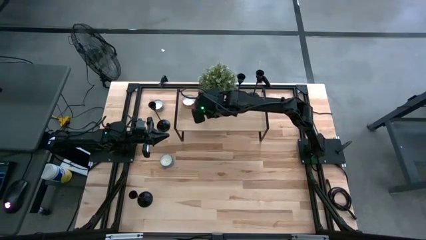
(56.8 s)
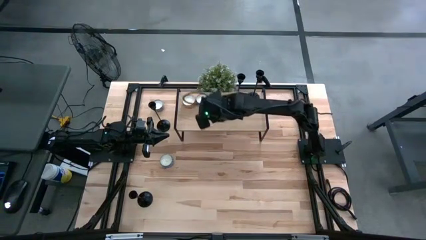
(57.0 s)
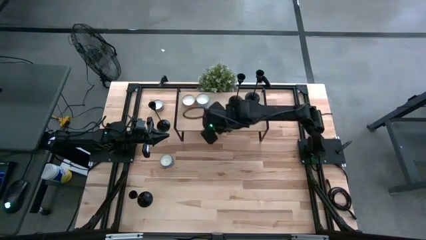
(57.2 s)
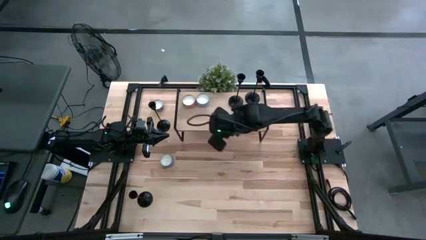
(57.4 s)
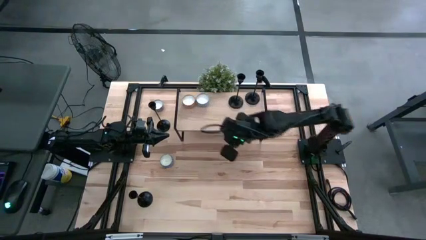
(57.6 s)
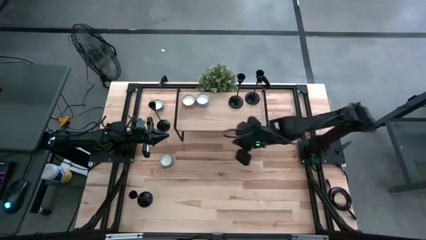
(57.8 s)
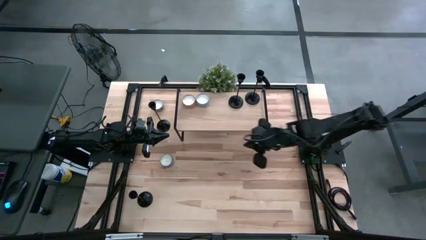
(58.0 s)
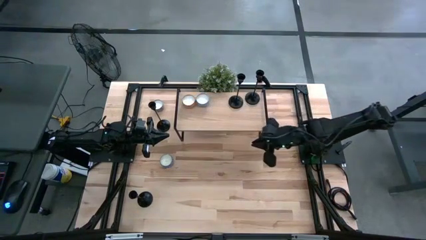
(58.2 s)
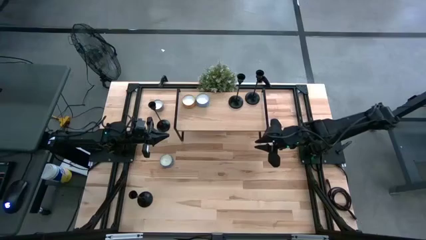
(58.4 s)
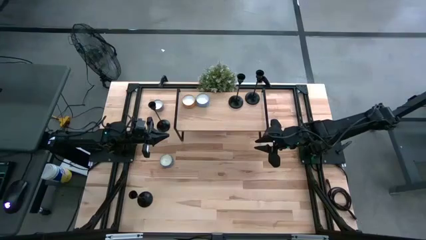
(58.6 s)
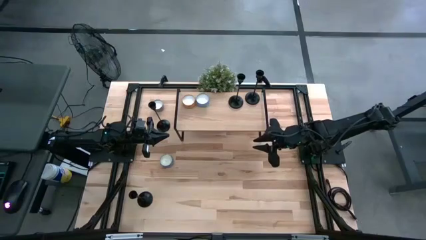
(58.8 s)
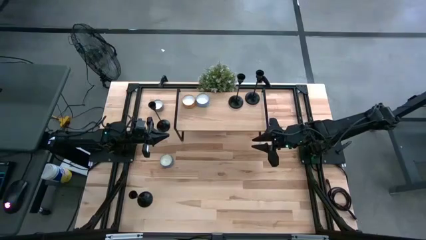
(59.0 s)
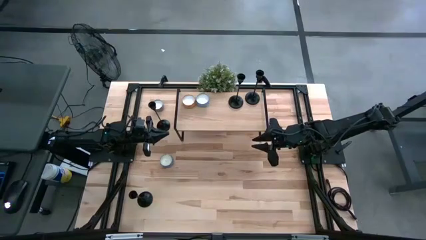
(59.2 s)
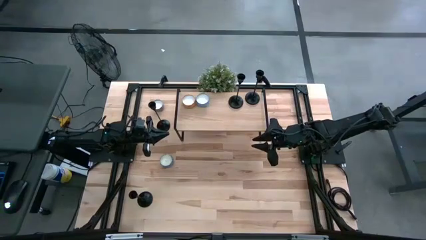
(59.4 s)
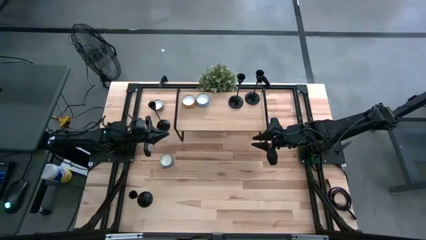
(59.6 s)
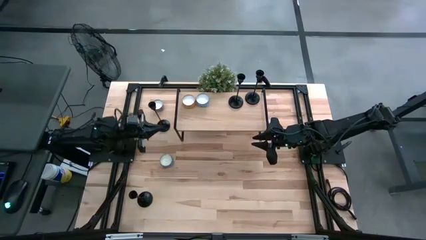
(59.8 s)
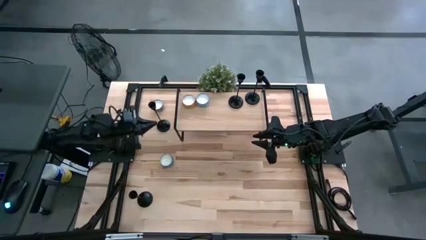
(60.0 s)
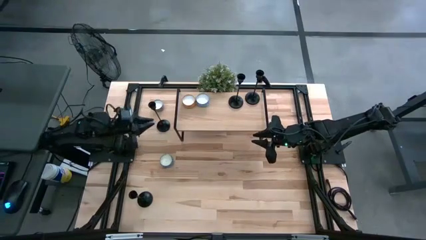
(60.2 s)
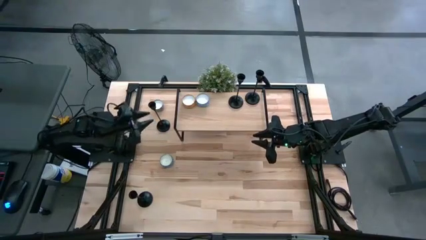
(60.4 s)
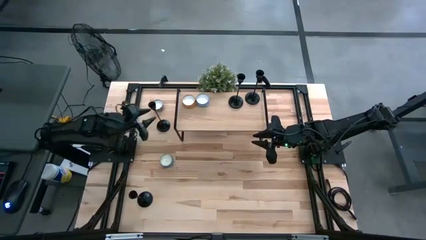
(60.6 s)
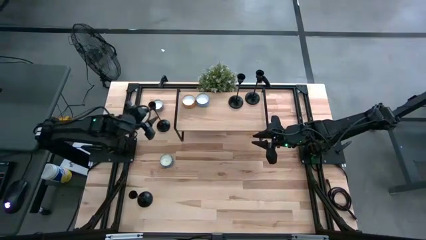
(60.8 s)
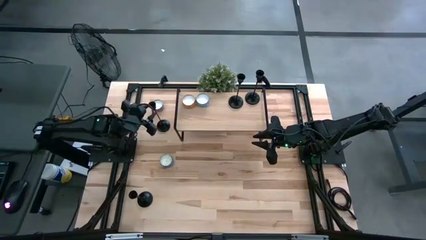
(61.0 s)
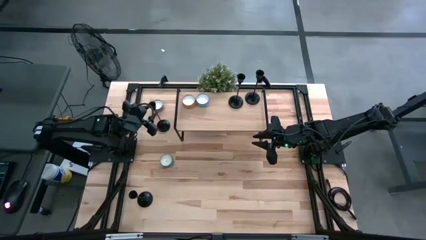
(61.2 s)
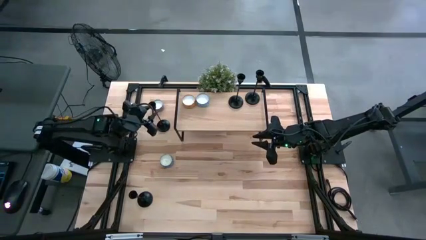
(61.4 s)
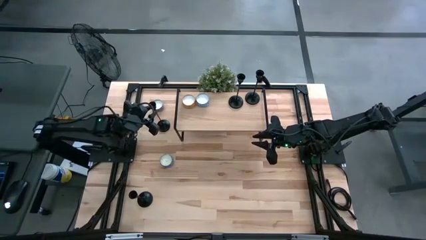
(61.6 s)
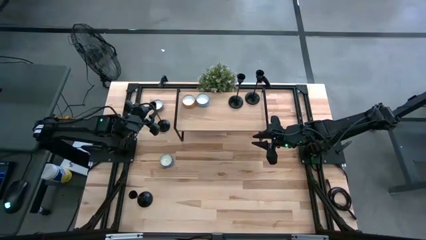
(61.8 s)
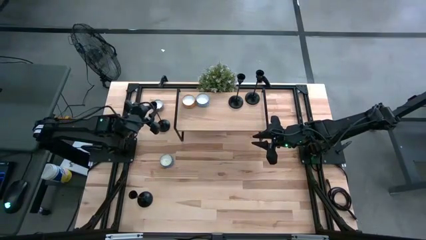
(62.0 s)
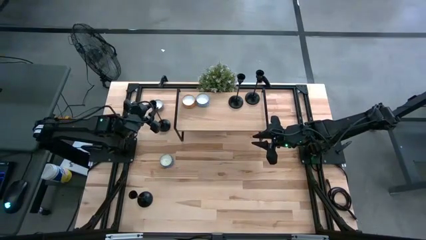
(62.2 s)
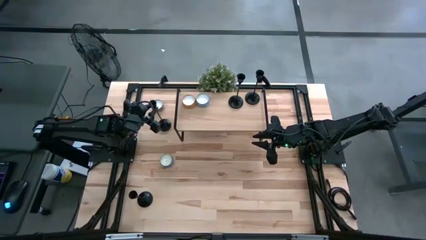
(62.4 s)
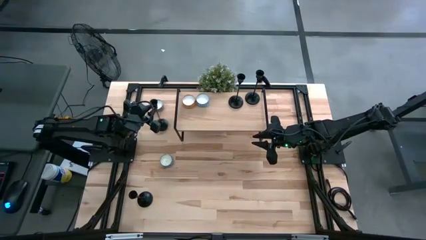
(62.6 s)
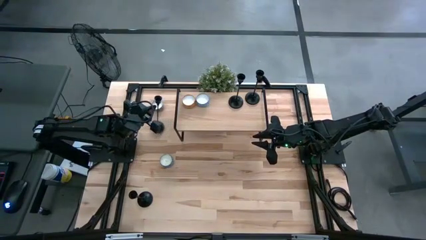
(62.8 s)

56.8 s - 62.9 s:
Task: Pick & Place candle stick holders
Put the black candle holder on the shelf aligned with the black candle holder

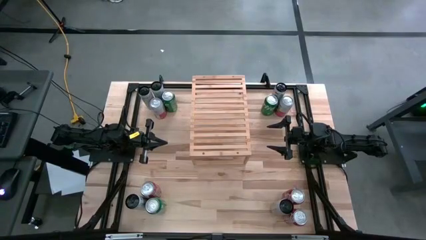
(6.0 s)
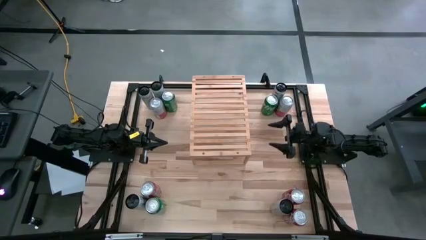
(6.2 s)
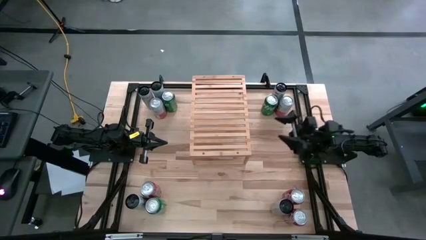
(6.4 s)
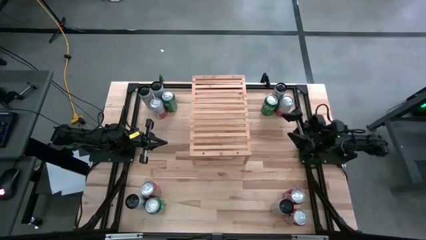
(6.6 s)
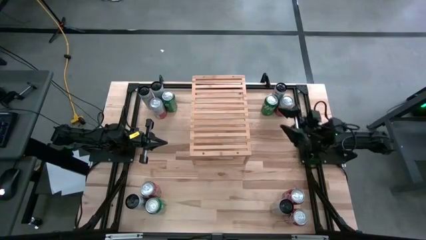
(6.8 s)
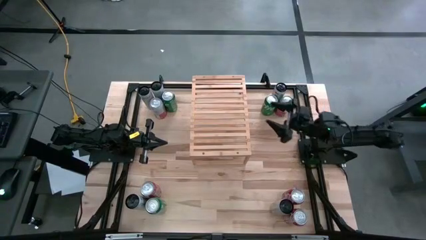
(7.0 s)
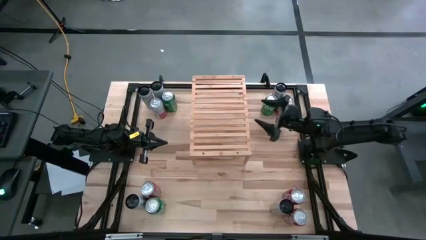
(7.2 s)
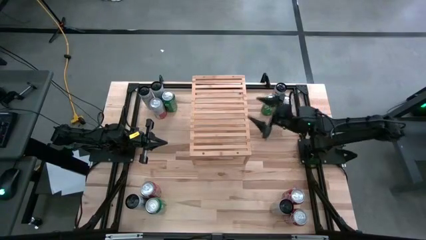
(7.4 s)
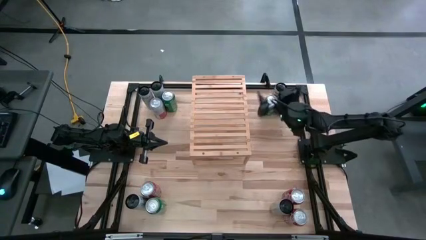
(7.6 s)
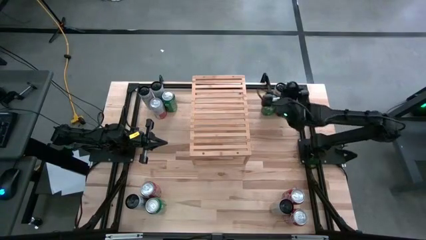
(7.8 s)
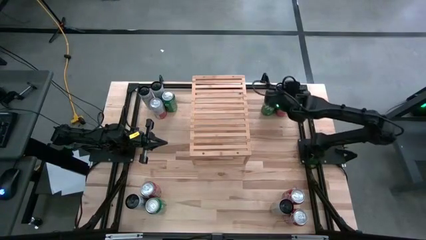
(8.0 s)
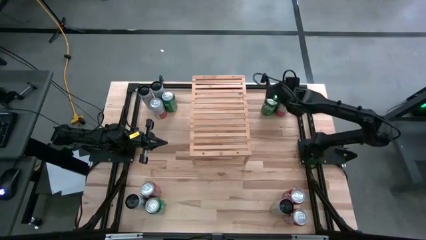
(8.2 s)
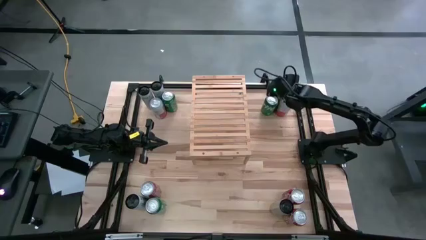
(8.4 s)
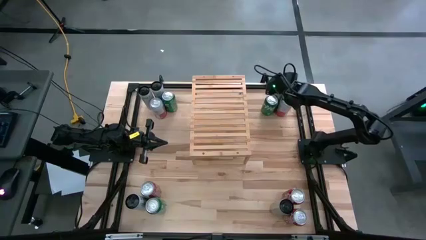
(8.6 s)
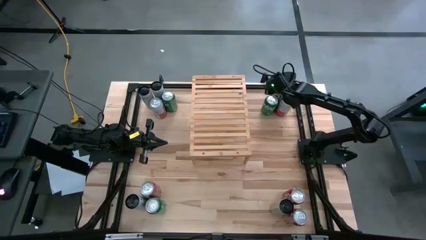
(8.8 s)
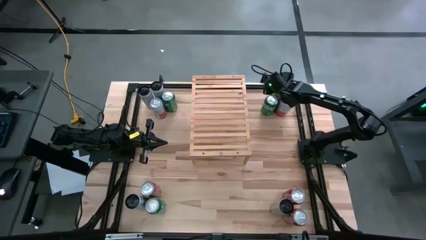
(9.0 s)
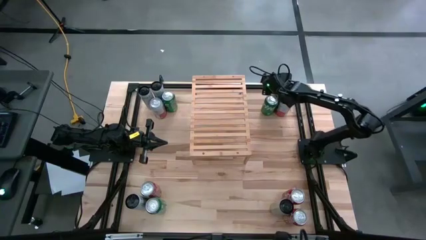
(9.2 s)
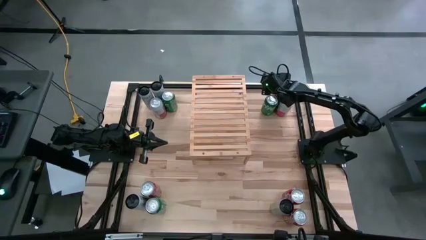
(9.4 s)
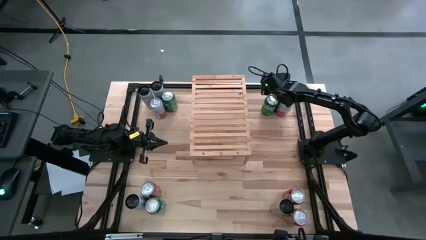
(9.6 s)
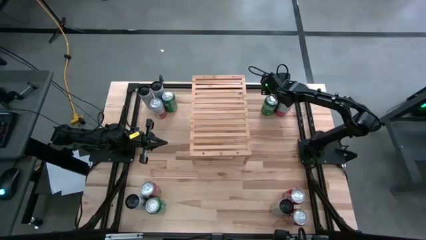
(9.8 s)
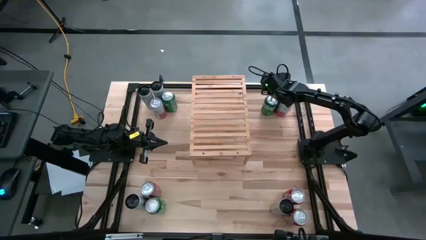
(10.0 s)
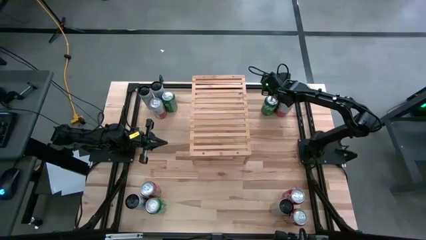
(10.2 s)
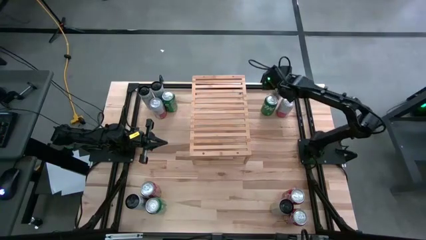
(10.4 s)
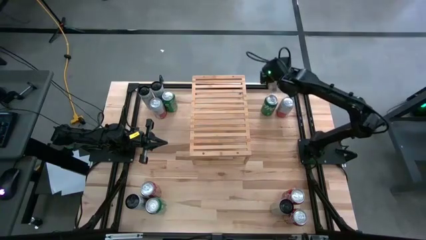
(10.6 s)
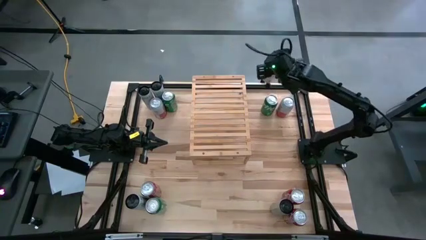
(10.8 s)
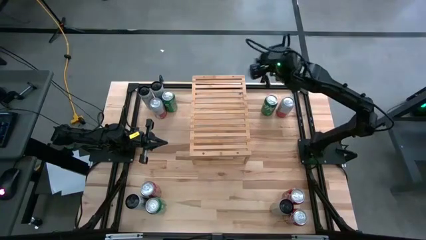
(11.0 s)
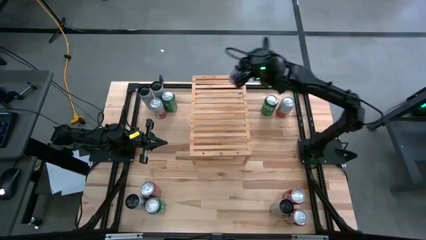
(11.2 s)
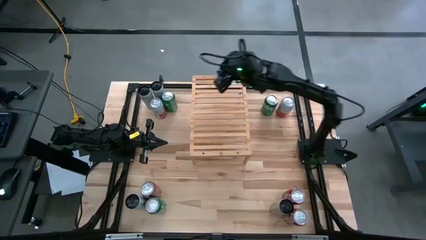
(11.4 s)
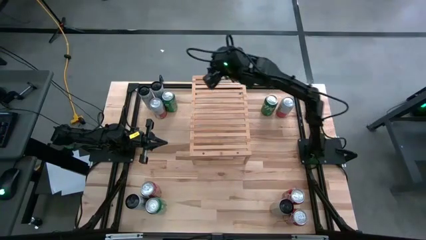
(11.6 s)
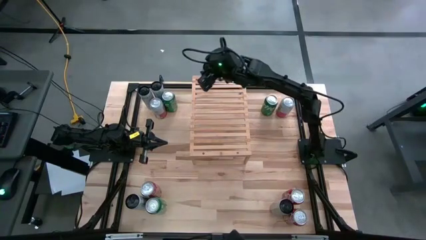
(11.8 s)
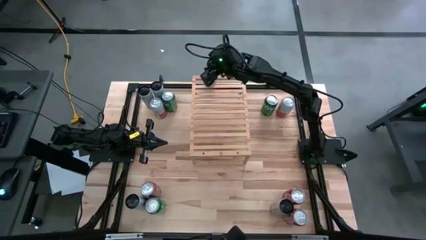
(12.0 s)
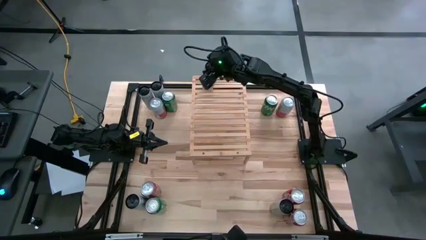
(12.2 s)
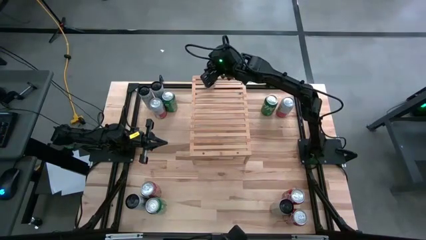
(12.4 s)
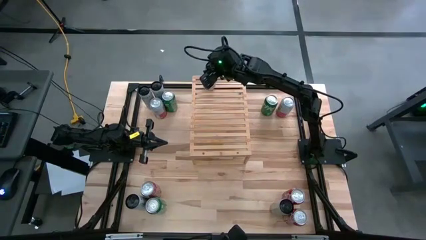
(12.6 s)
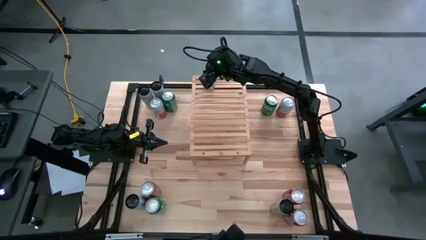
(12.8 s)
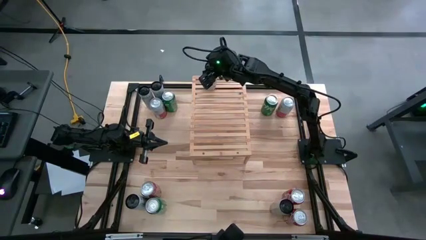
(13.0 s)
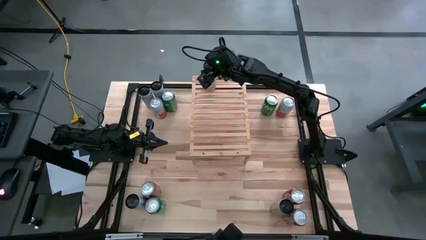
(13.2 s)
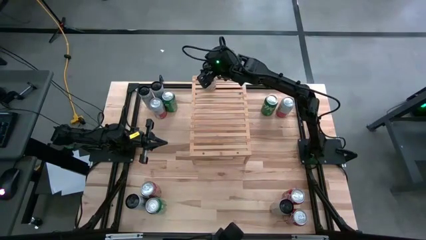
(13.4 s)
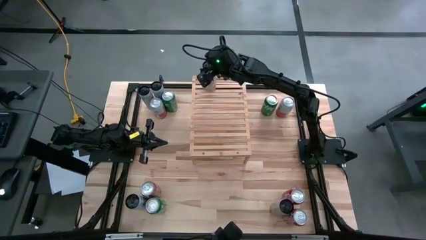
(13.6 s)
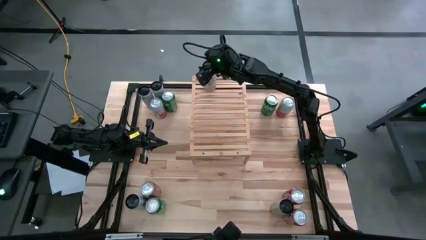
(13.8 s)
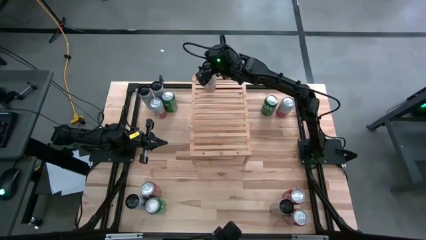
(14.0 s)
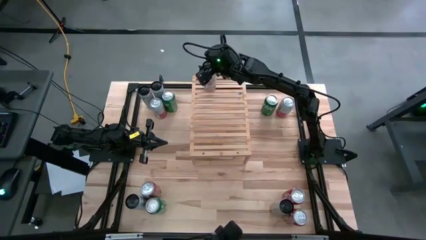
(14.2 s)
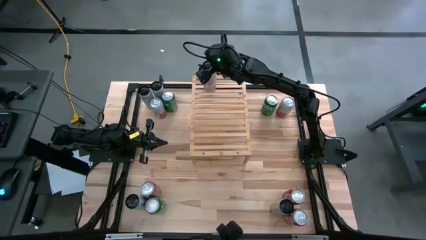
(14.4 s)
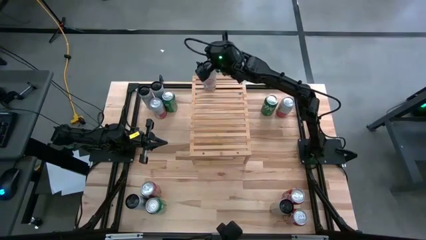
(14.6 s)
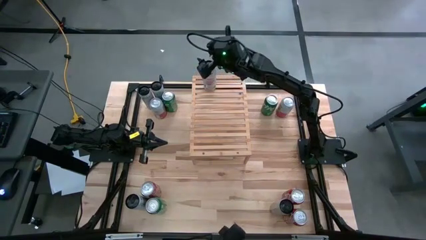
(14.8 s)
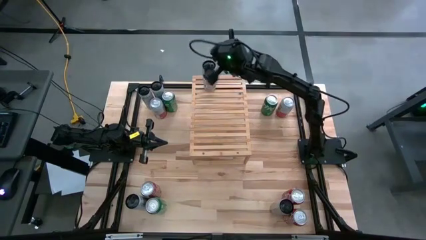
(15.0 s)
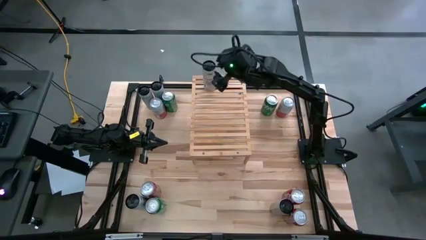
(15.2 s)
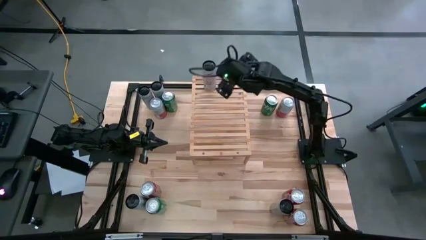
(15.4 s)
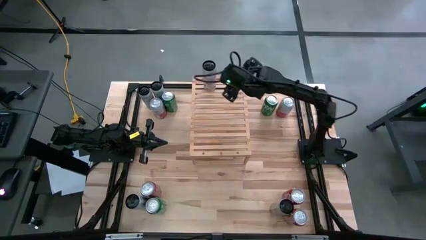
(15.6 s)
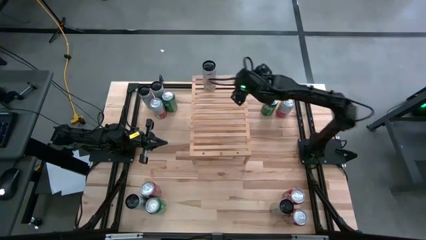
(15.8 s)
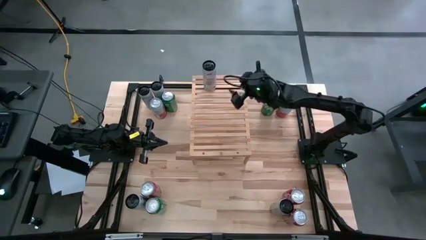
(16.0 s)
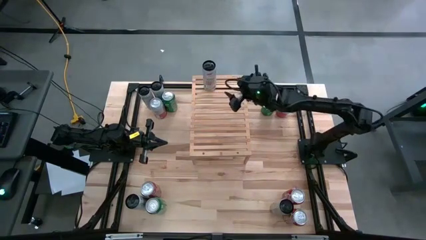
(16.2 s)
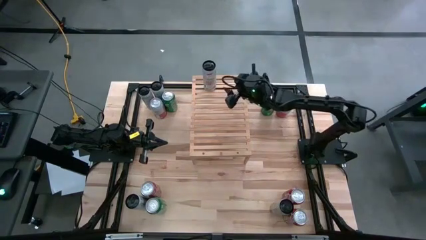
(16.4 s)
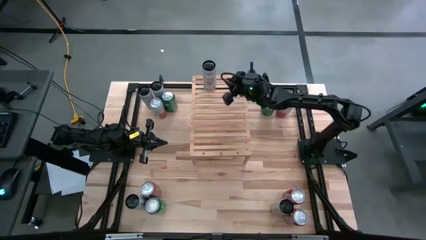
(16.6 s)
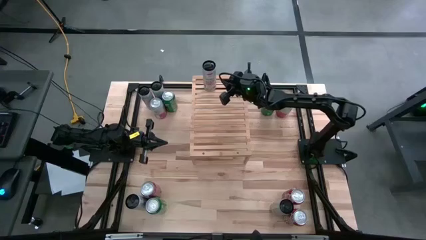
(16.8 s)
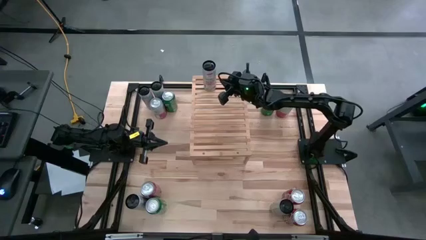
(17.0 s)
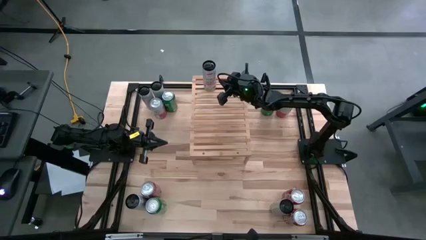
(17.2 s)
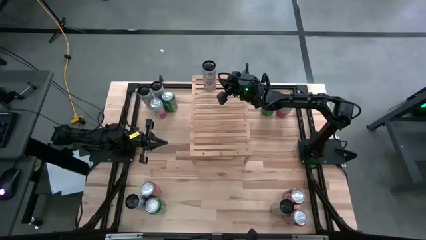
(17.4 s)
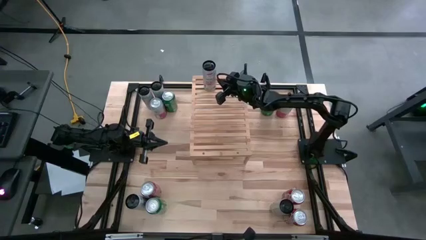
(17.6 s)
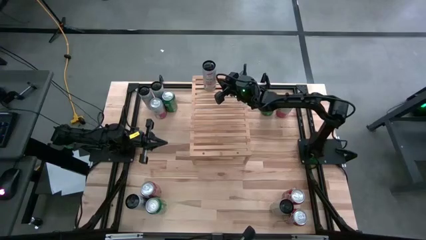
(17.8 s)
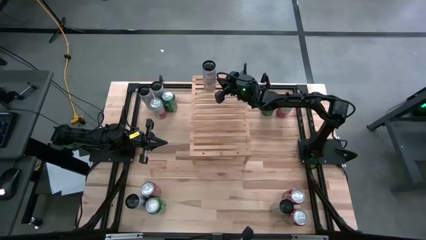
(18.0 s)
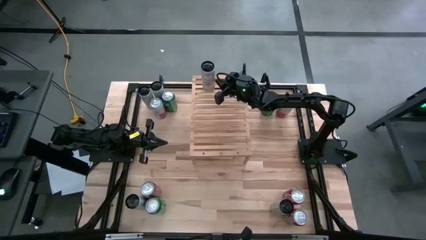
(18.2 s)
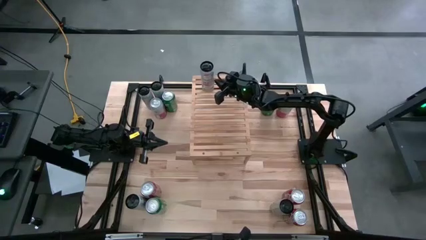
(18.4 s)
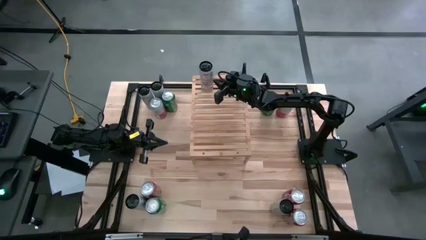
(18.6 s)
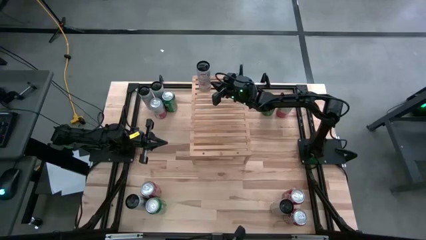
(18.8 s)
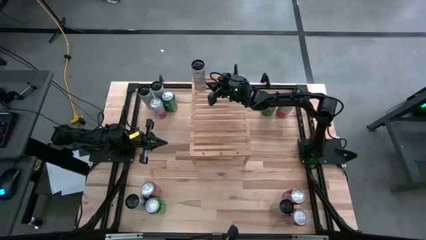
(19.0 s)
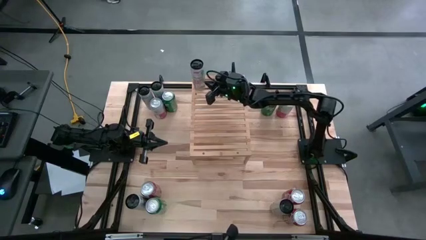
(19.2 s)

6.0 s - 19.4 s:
Task: Place canned beverage on shelf
Put the top right white pink soda can on the shelf
